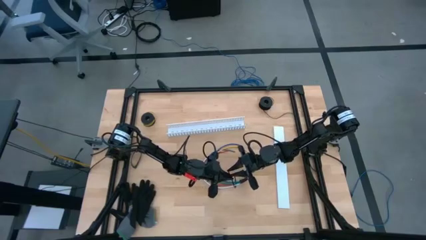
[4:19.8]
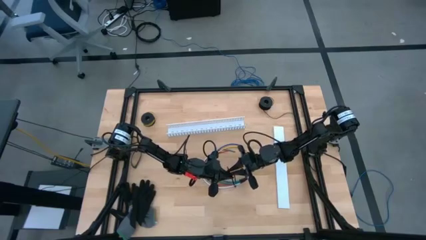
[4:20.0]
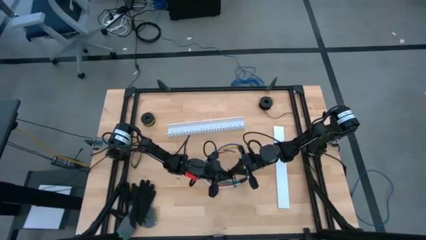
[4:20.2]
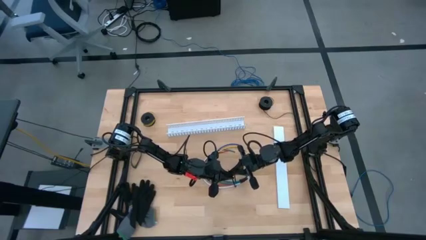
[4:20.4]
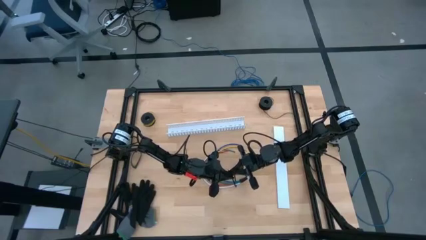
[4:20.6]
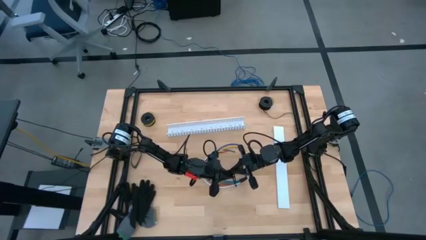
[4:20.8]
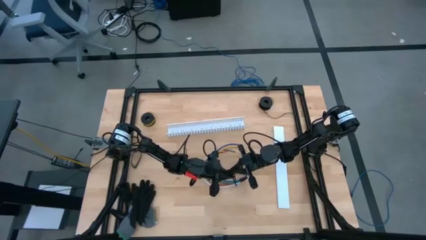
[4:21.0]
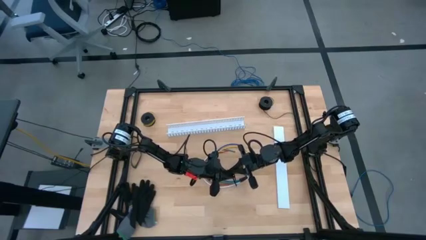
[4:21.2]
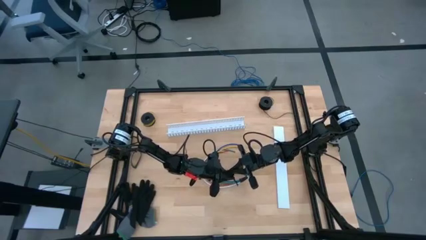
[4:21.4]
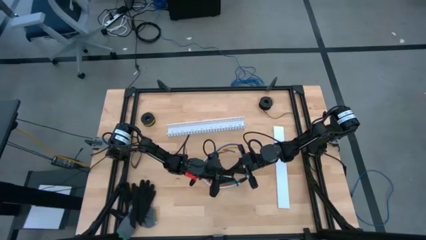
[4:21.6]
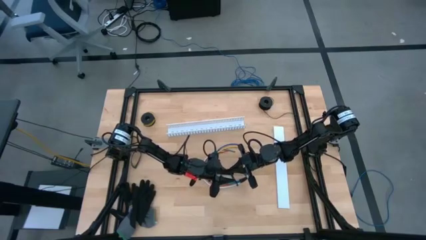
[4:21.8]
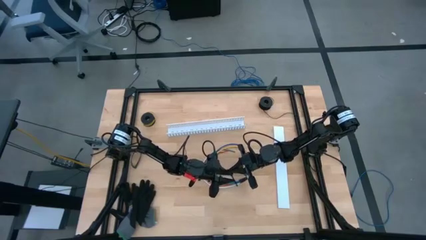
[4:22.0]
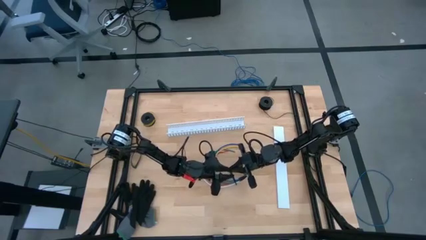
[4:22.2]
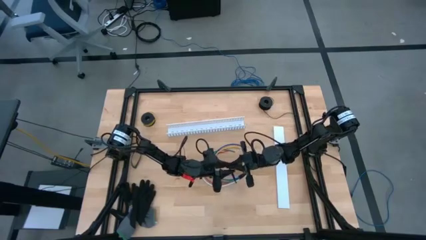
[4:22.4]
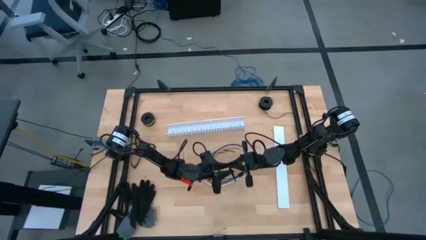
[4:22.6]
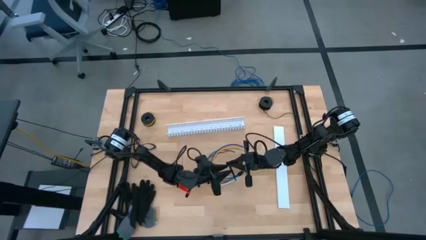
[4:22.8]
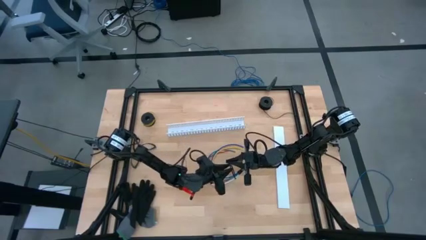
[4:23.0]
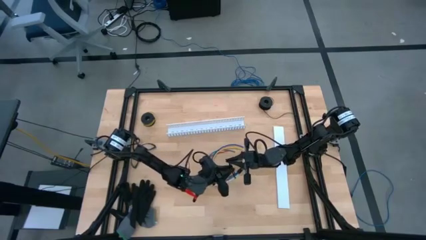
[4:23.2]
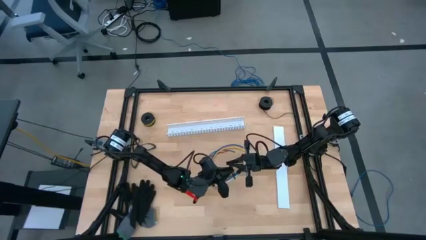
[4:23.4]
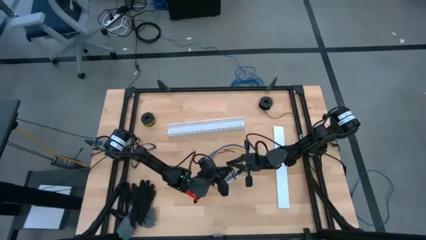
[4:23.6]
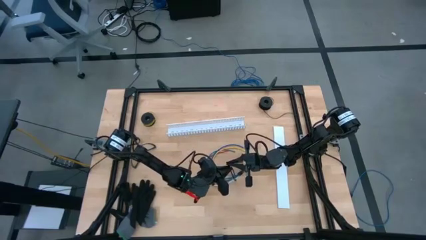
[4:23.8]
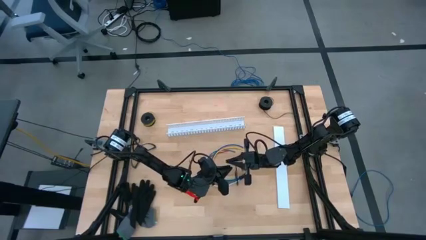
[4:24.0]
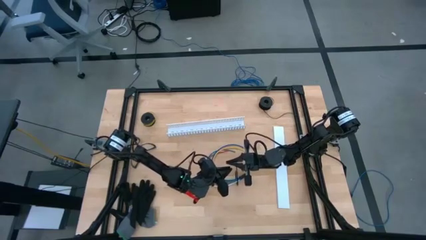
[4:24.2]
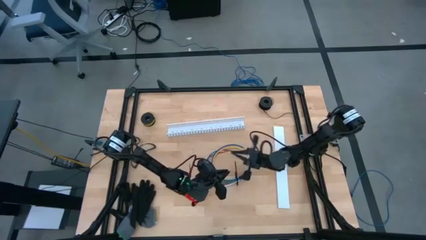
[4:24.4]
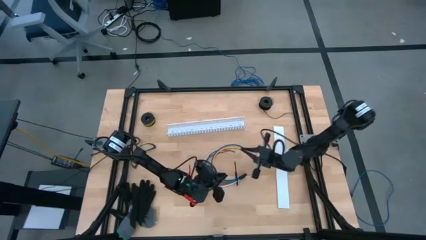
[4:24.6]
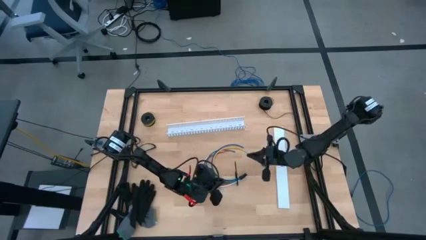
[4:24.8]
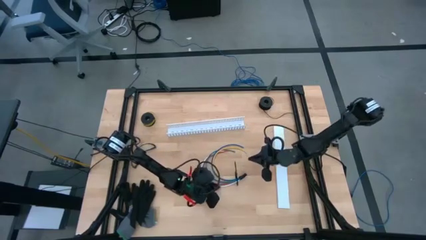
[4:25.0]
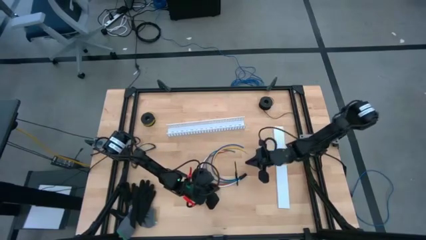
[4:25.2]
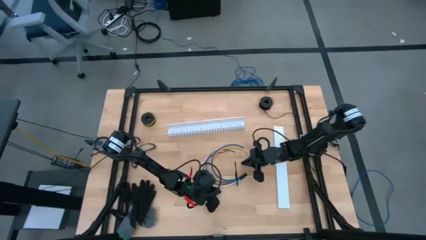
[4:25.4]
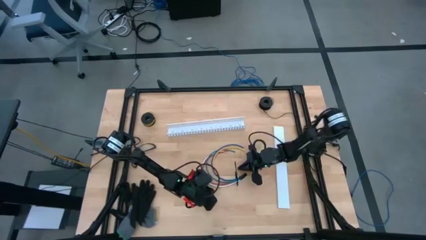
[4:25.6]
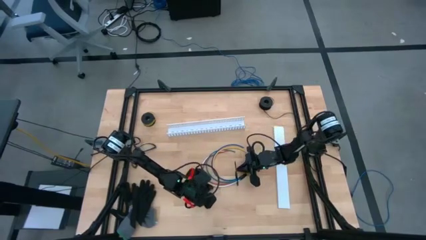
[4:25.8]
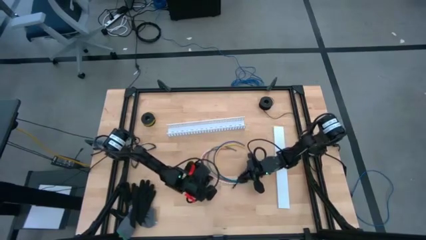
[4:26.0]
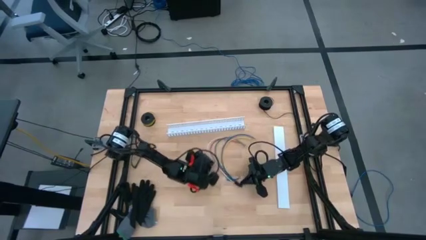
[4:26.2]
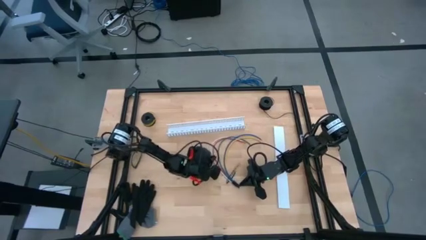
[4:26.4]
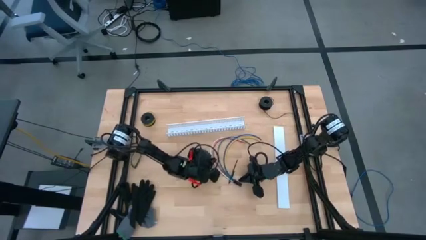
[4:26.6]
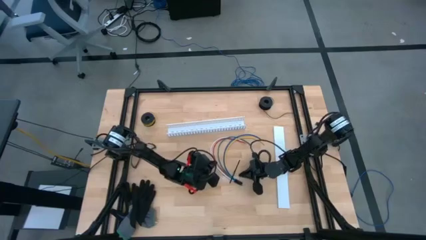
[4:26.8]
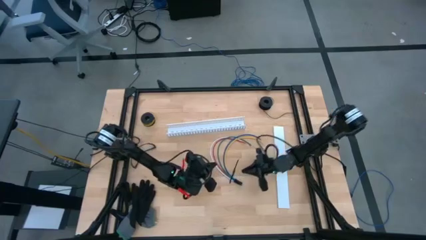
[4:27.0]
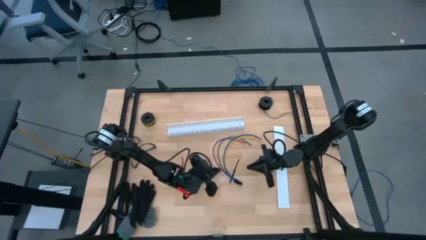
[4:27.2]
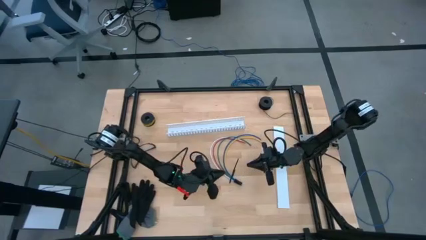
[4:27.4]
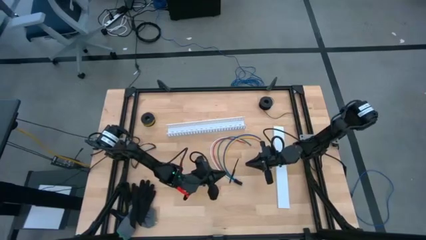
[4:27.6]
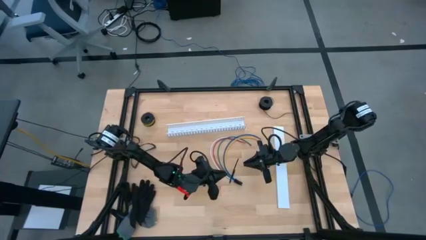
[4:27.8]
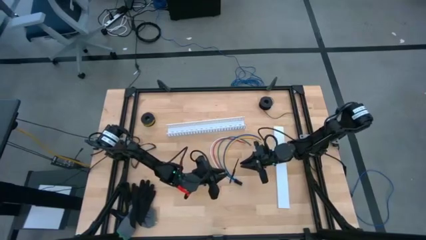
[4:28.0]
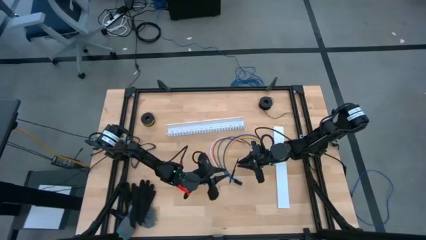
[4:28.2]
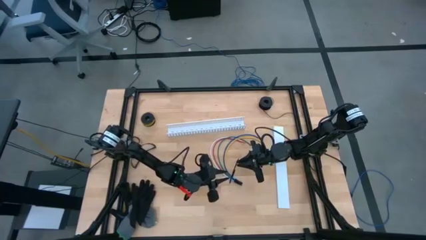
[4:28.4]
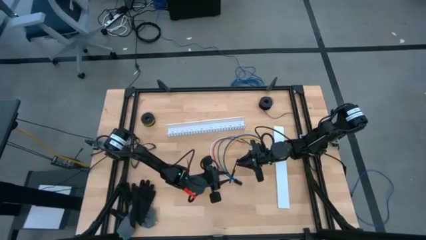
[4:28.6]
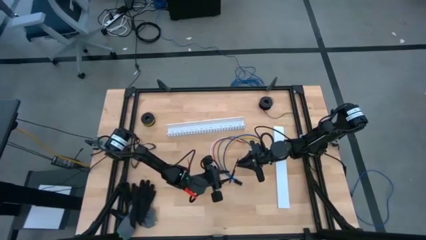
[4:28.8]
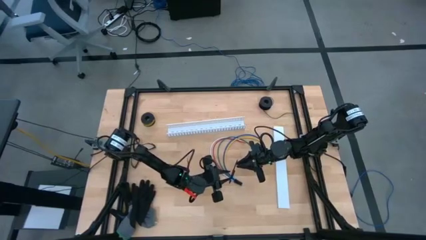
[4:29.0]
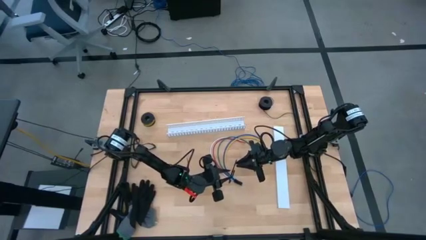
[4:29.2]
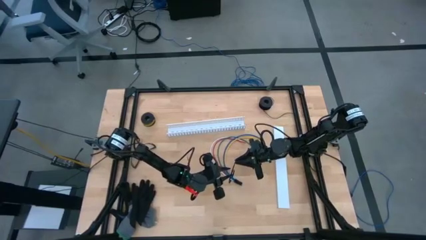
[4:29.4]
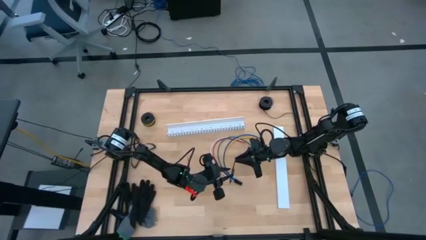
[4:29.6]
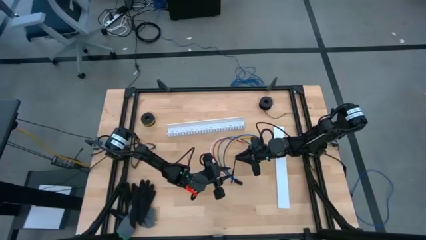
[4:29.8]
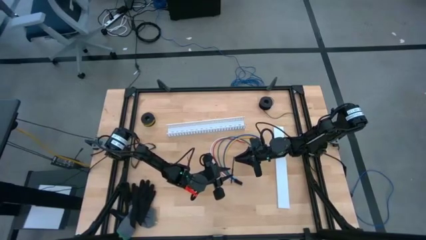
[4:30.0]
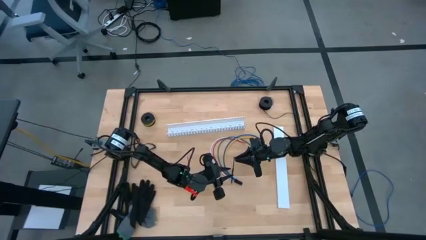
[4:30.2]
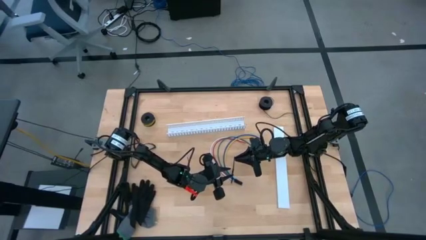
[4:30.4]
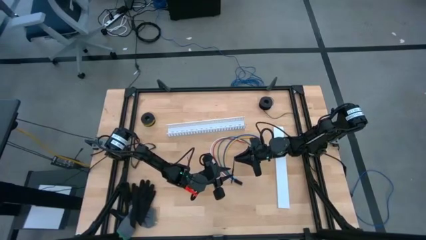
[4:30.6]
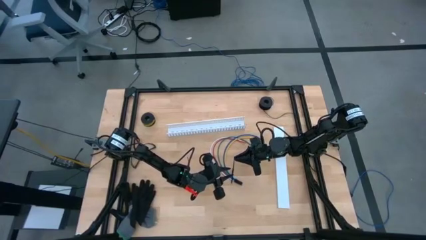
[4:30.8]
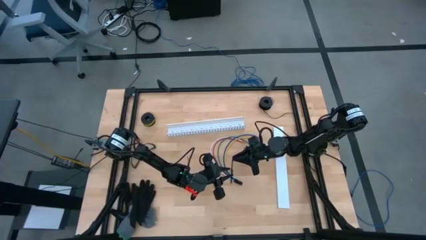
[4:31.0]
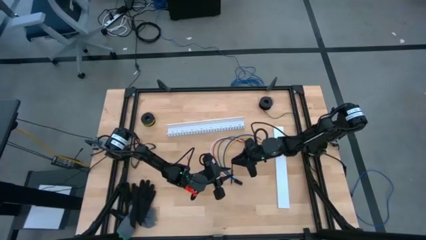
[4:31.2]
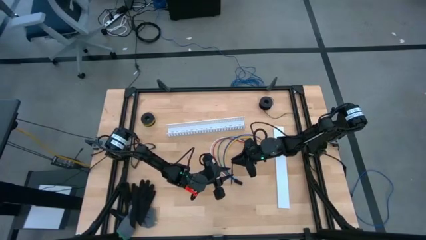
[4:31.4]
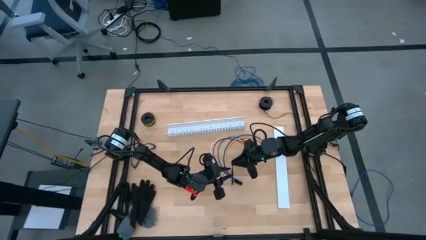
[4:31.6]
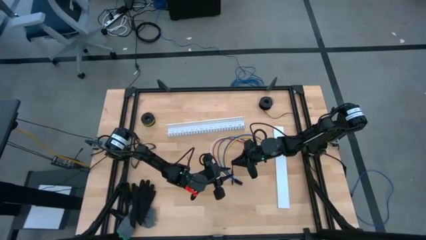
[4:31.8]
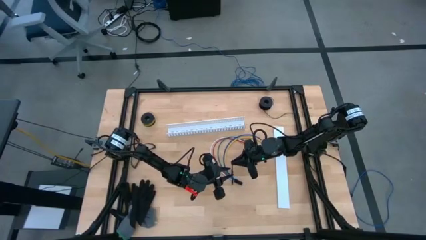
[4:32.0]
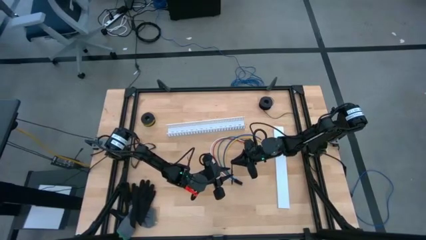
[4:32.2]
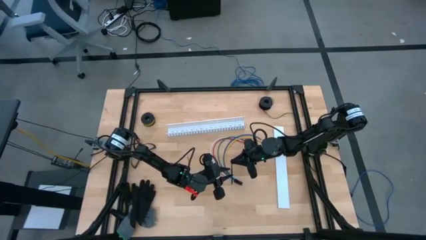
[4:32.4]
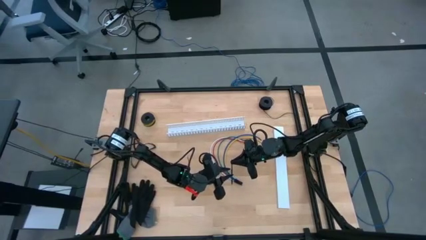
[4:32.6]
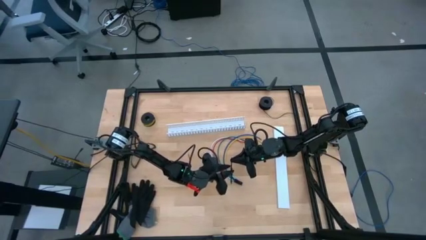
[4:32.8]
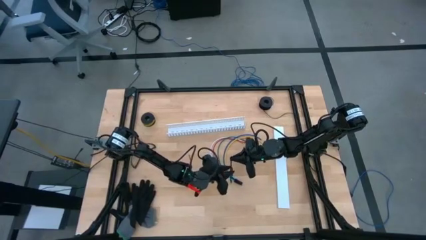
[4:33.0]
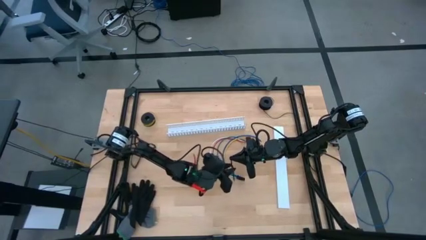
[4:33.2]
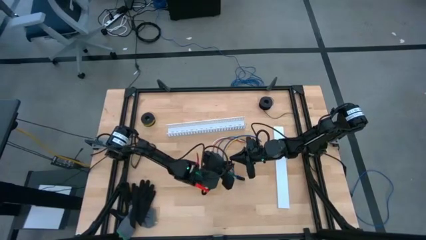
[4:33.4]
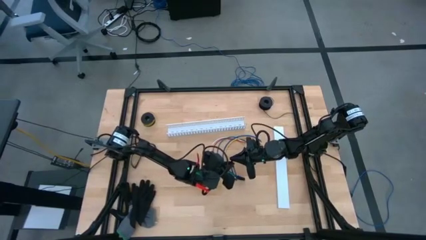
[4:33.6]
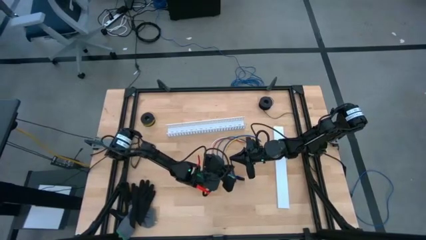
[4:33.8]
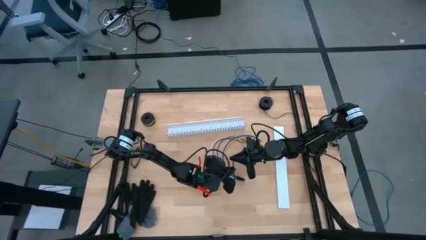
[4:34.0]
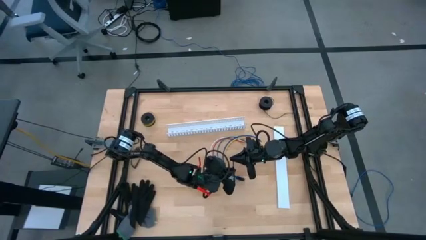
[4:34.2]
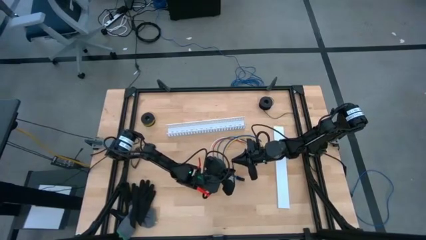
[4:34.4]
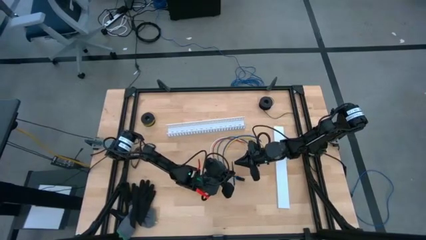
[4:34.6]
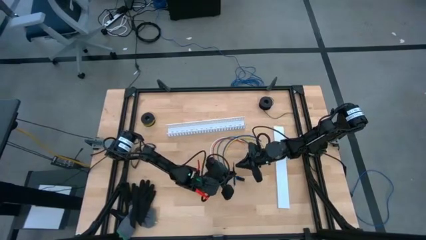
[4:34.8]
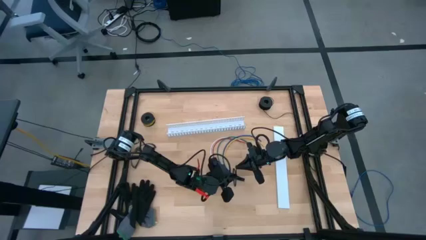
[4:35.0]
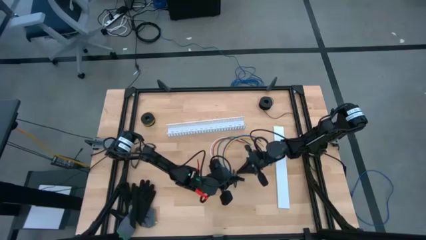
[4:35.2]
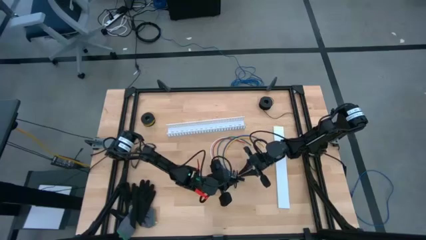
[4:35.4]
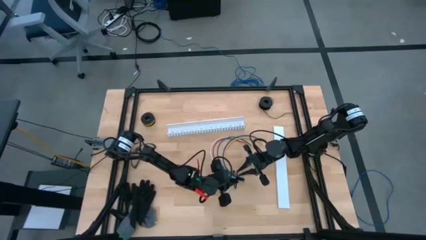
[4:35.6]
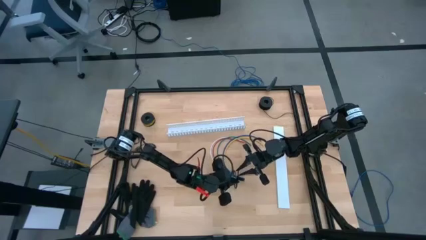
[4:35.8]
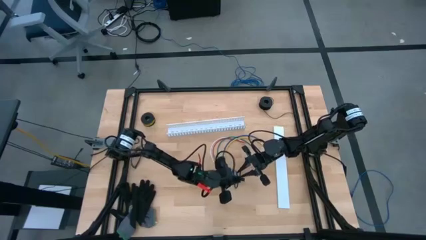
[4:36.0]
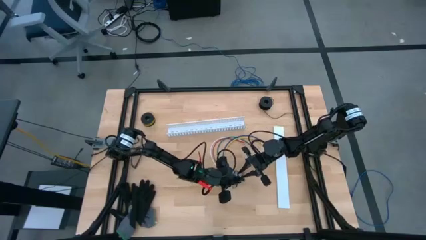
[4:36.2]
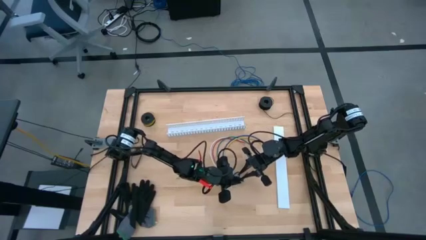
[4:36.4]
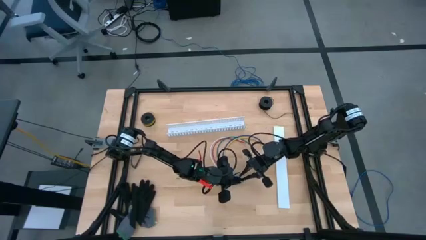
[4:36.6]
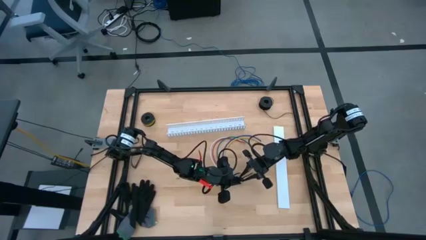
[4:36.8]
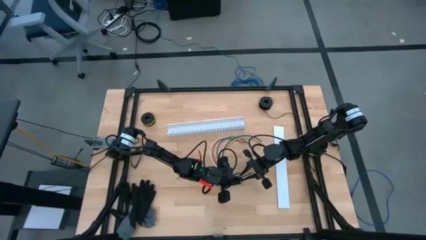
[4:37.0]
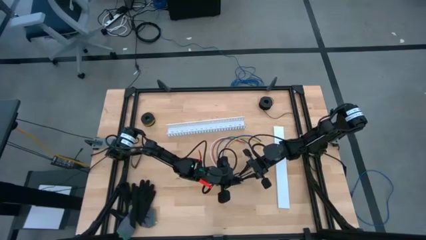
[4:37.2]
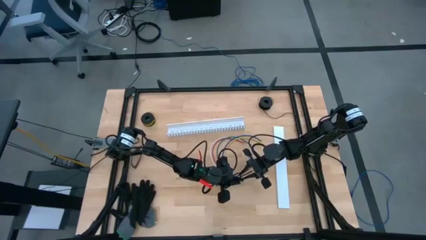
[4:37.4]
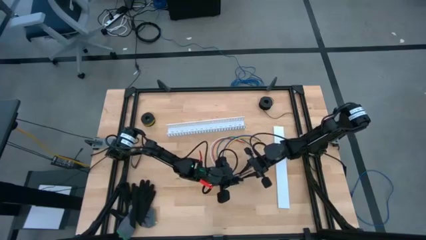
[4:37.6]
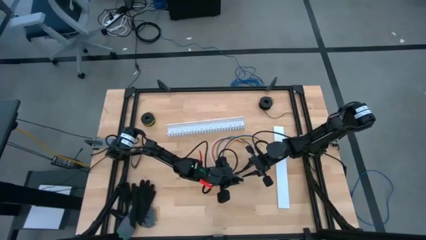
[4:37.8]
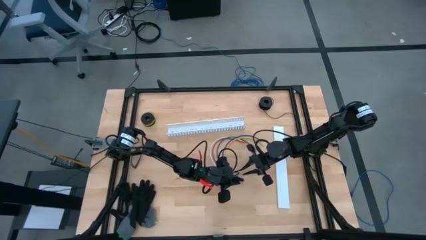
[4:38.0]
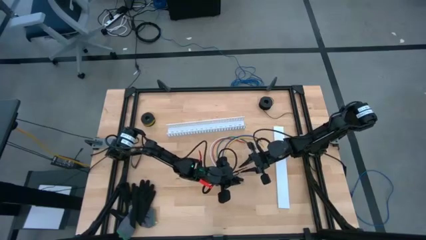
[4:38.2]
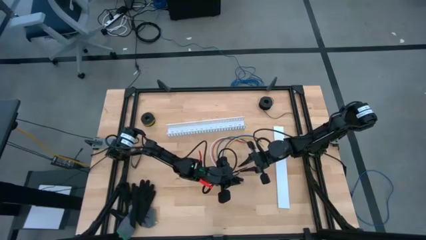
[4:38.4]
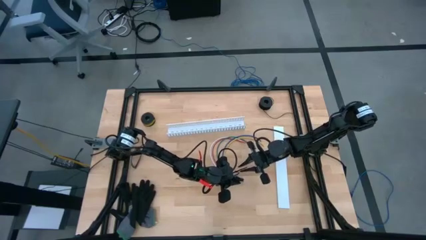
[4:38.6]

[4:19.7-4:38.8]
Task: Ziptie cables
Insert zip tie on the cable wire
